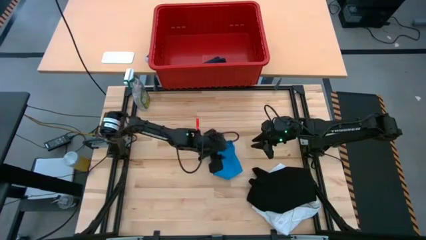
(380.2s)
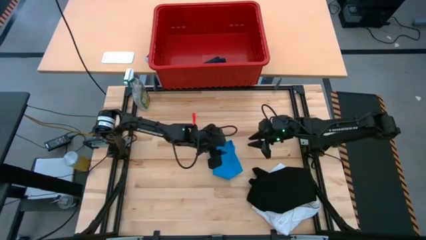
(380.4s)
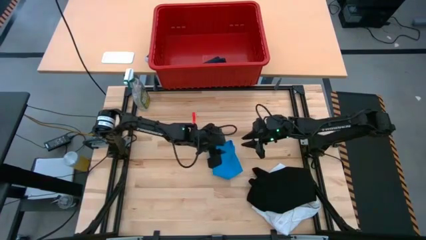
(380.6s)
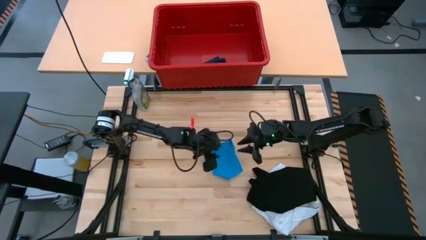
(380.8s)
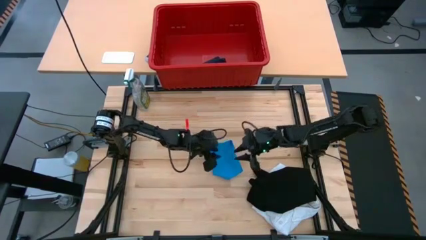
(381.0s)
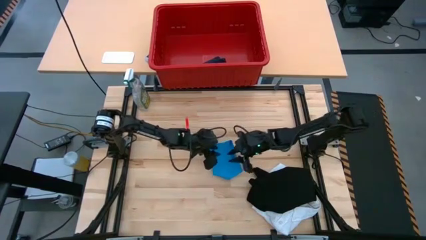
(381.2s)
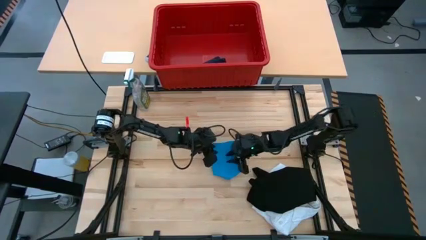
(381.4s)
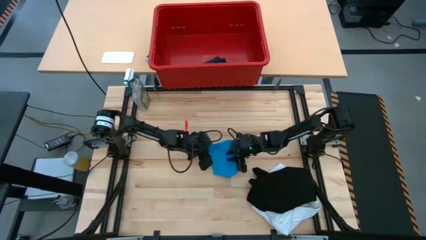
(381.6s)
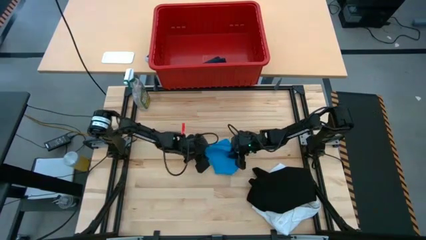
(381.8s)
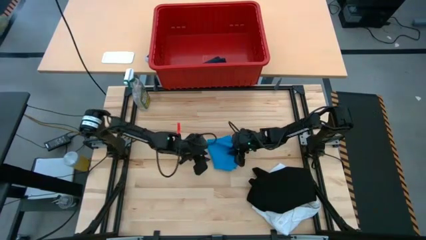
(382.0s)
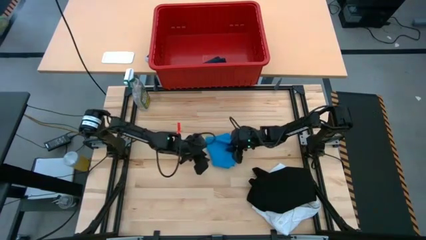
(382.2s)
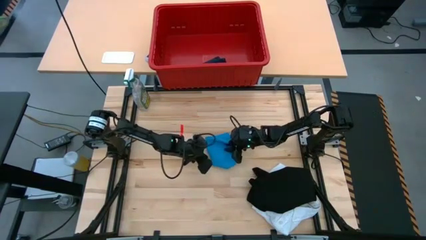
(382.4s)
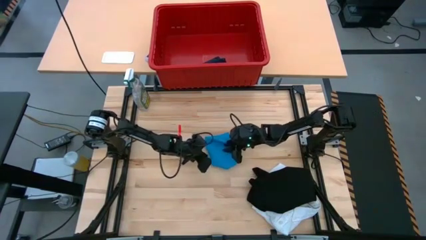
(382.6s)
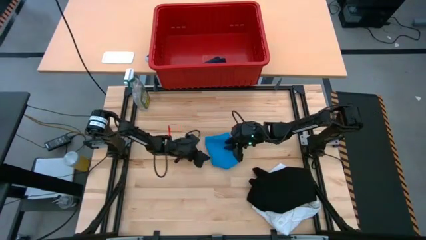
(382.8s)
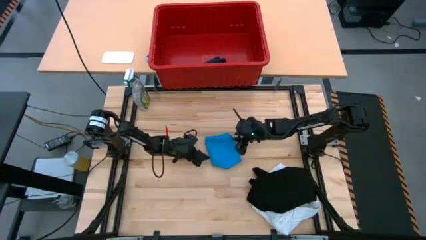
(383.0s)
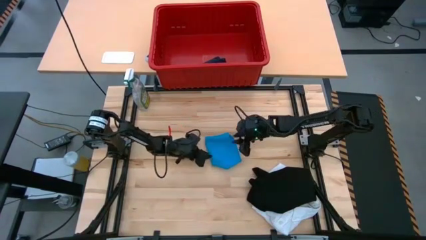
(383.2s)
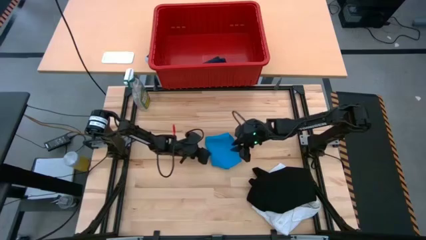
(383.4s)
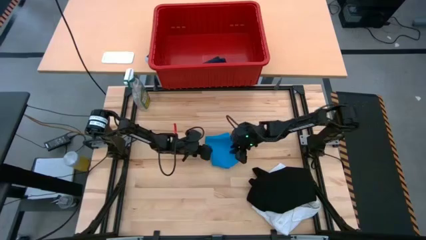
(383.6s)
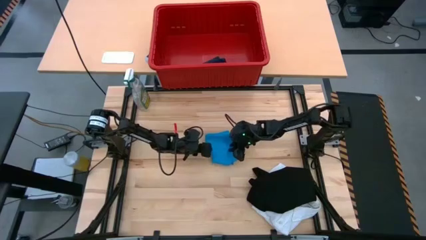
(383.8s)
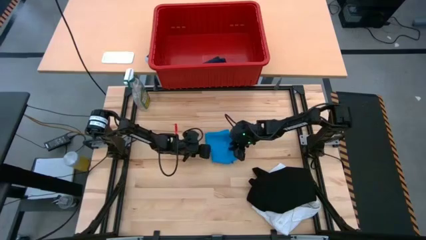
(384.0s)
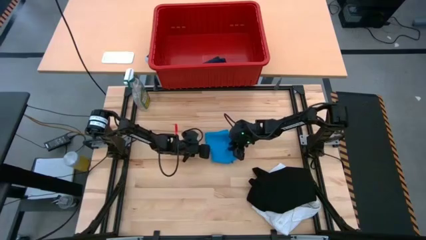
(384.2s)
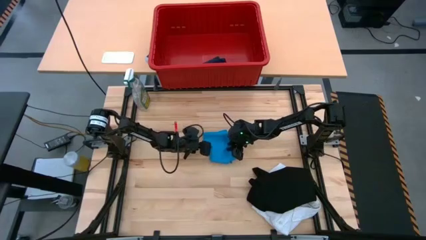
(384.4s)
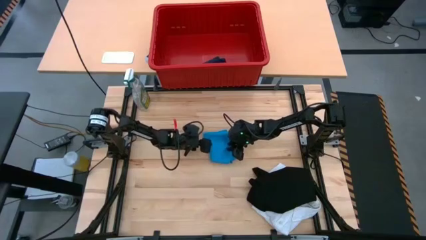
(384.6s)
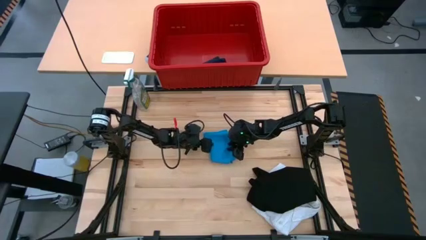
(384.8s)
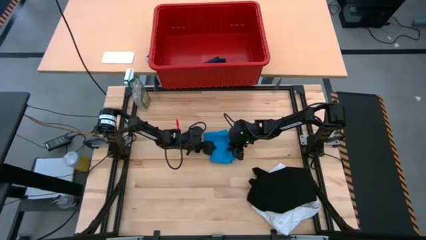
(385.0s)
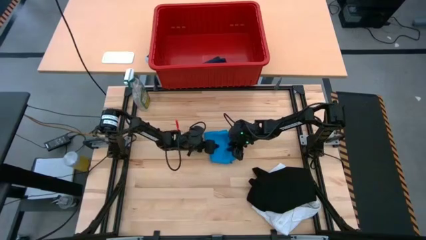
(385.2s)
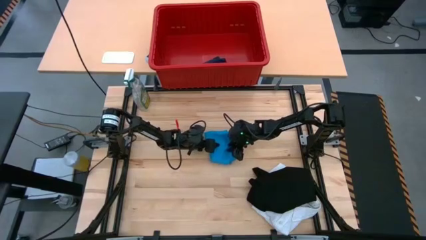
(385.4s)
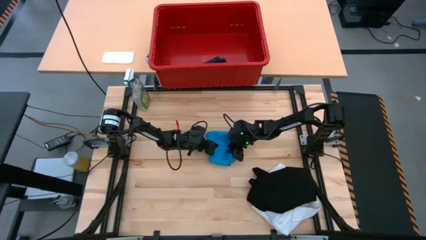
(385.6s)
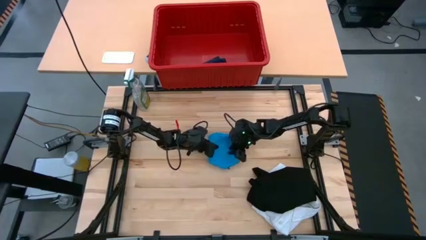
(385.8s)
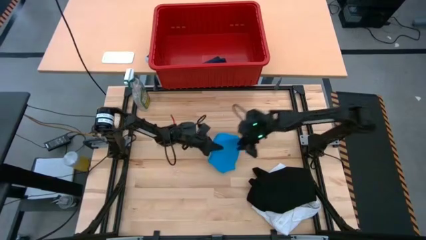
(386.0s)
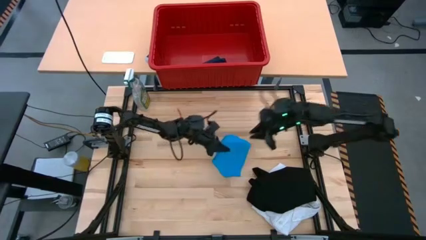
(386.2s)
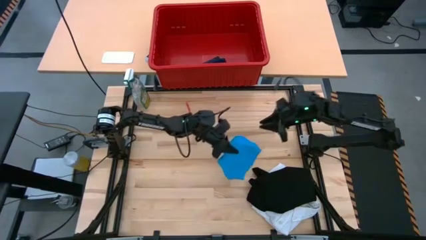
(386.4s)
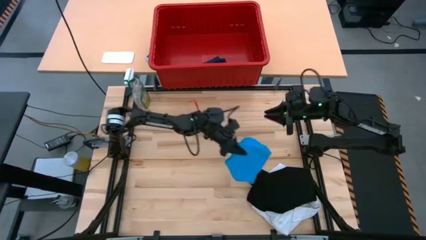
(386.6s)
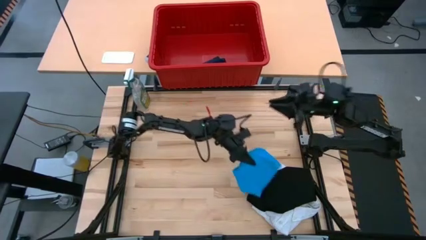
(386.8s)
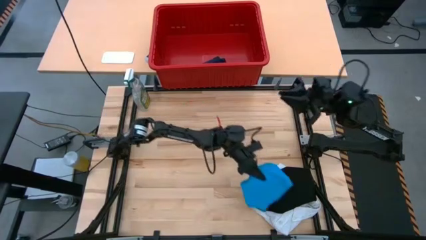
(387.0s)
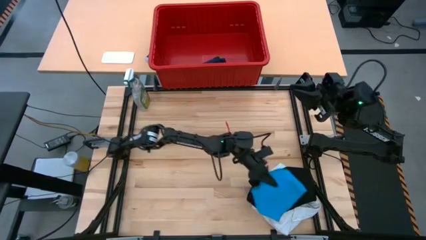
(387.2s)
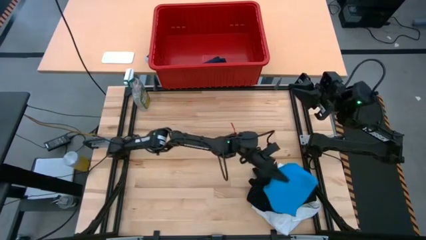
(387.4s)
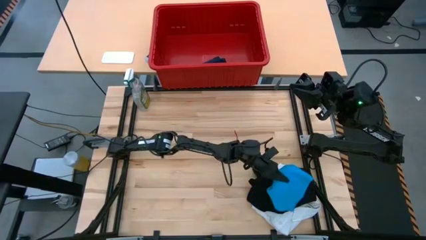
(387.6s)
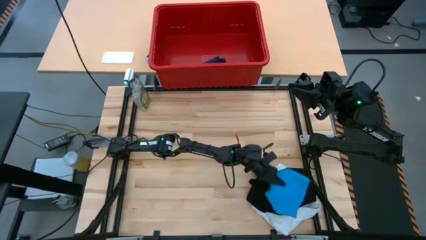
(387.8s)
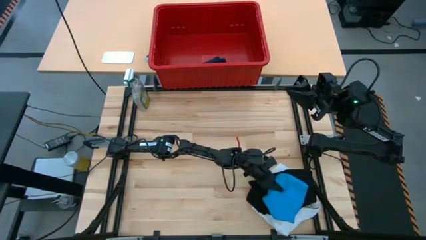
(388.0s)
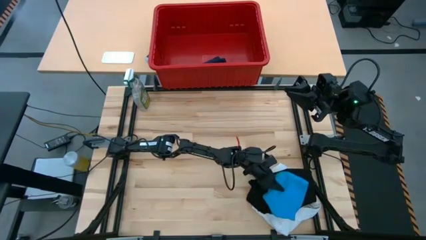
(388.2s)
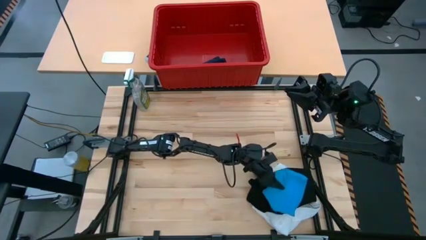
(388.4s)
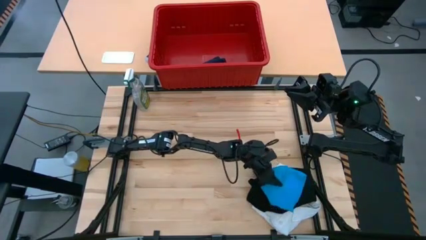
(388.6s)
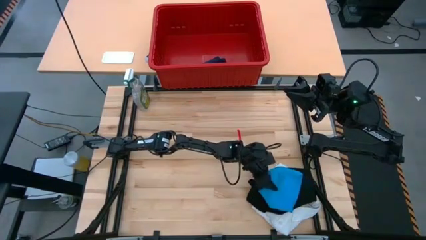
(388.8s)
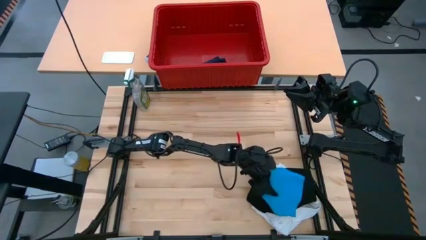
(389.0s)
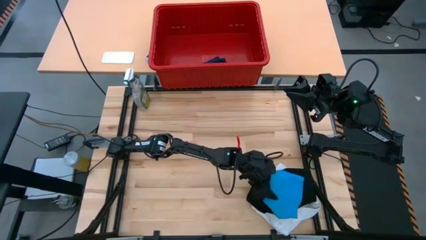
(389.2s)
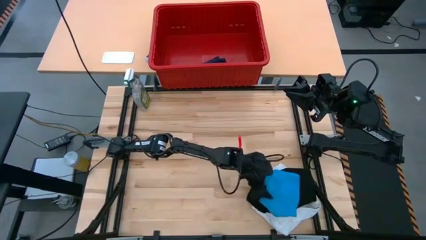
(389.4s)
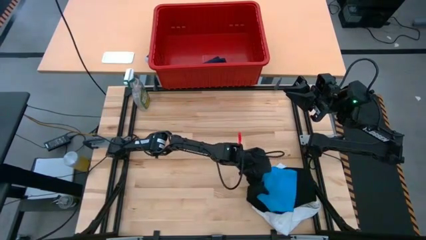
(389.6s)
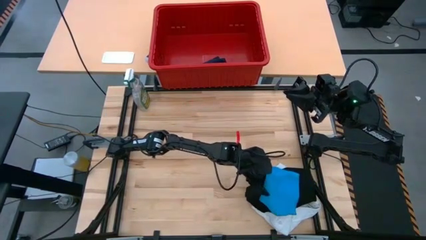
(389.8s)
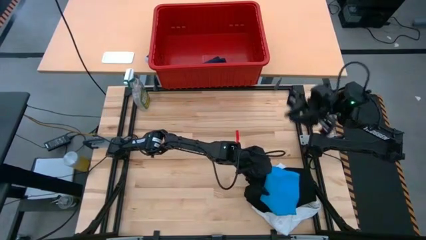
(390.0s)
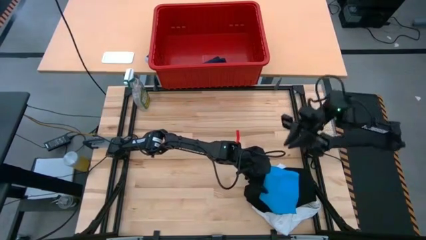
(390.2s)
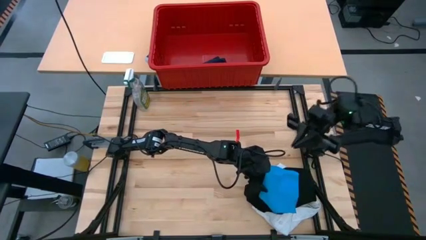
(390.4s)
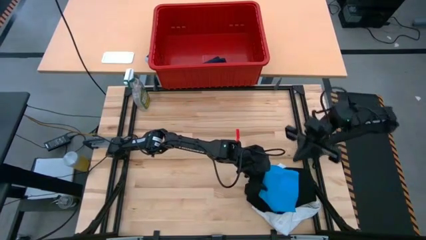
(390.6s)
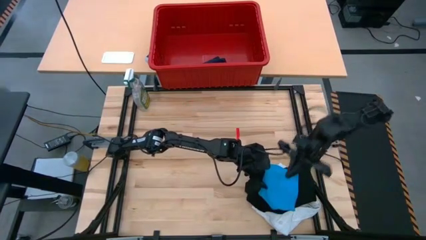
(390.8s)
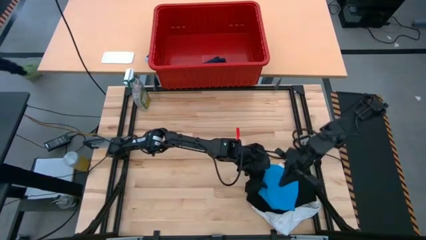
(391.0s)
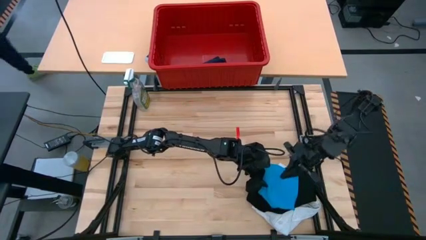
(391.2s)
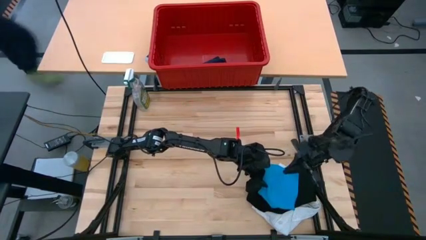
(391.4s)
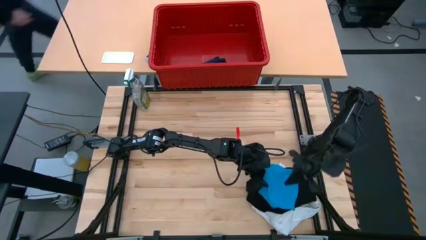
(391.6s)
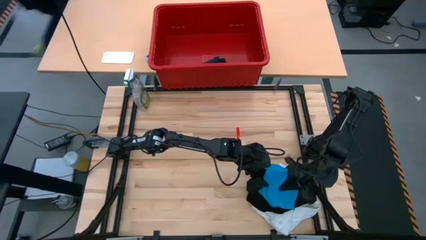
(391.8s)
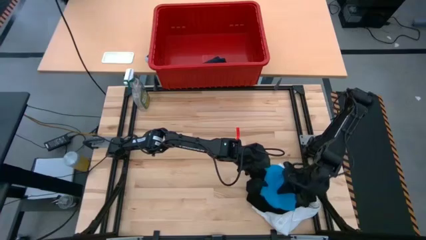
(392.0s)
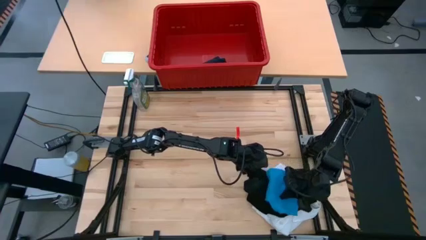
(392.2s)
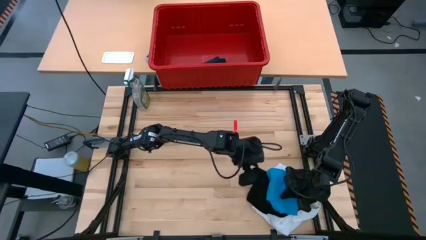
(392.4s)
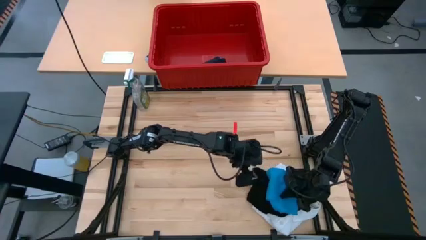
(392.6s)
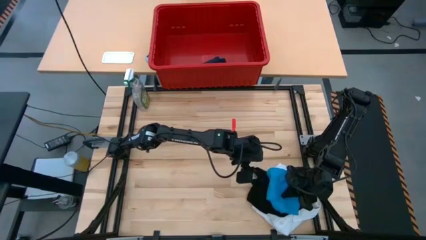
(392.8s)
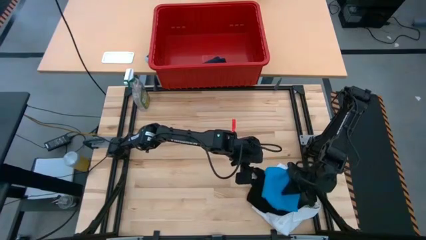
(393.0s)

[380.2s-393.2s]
Task: Fold laundry
Stack the folded blue shorts on top of the folded black shirt

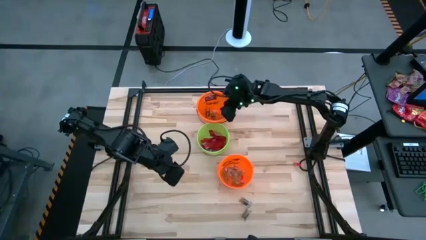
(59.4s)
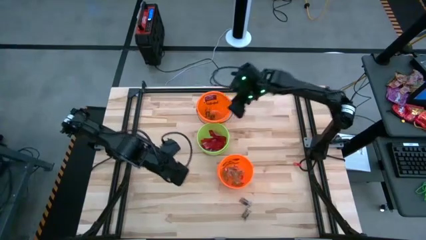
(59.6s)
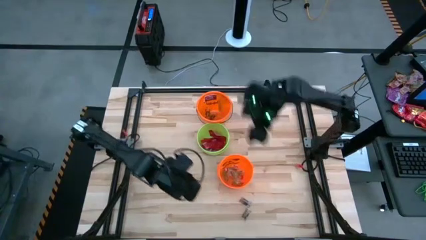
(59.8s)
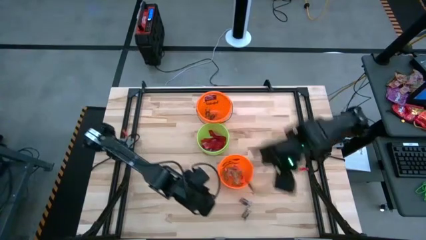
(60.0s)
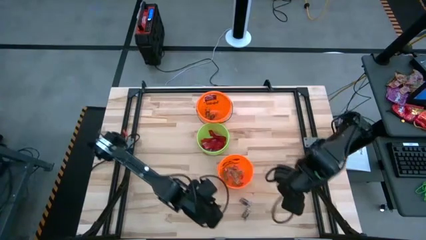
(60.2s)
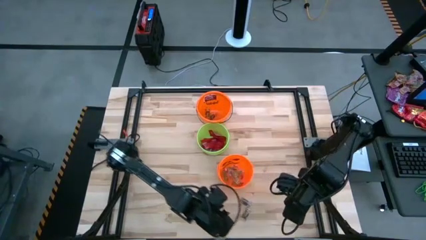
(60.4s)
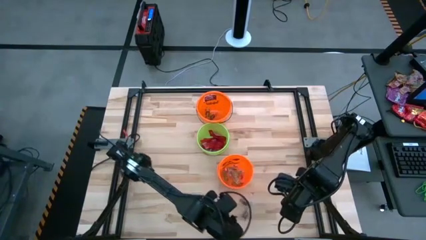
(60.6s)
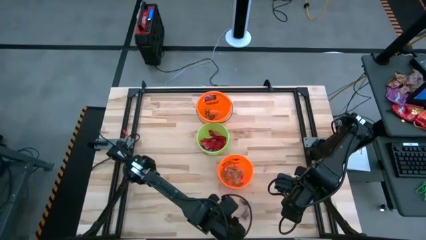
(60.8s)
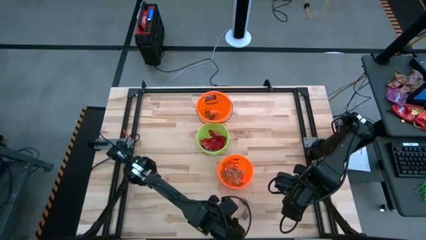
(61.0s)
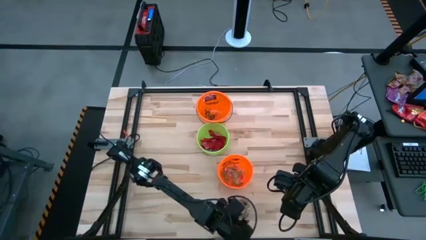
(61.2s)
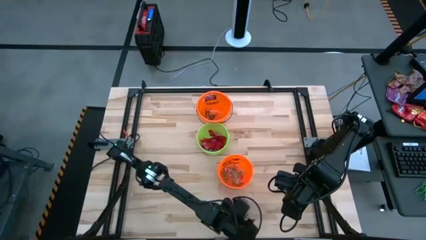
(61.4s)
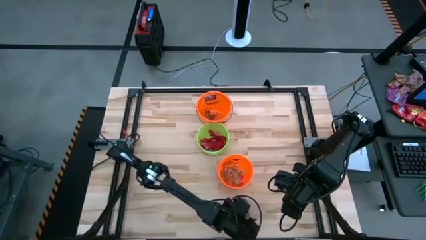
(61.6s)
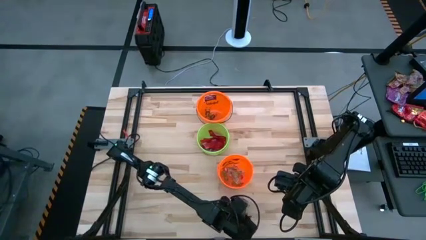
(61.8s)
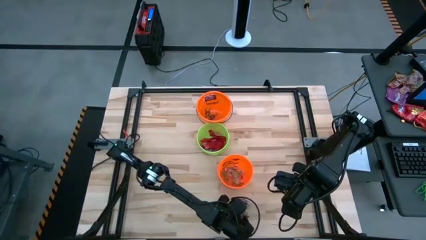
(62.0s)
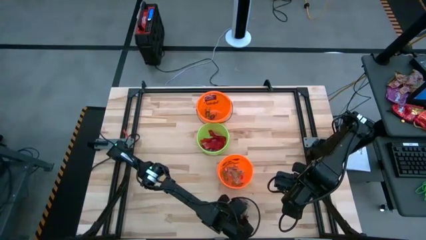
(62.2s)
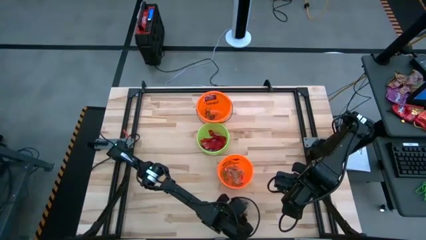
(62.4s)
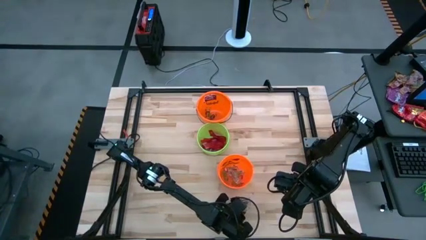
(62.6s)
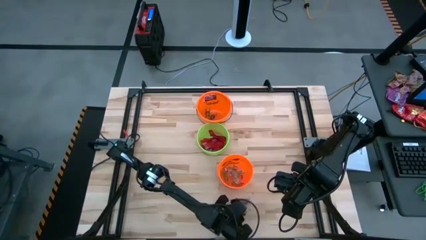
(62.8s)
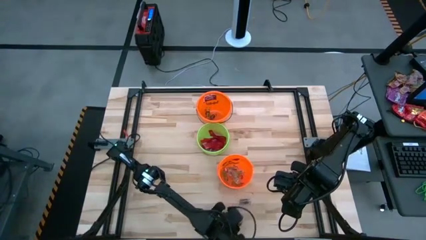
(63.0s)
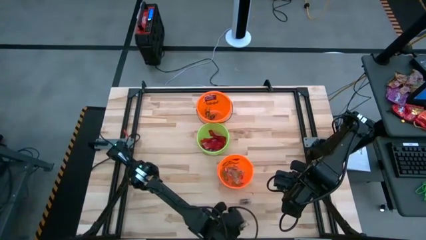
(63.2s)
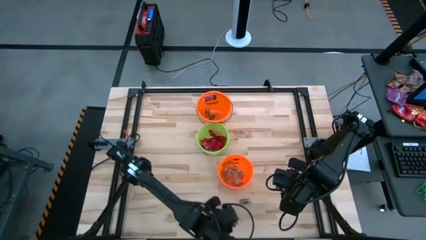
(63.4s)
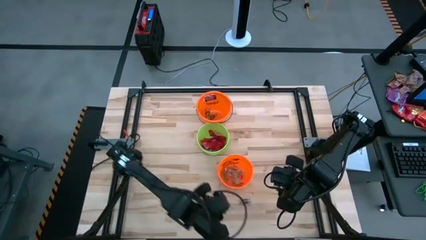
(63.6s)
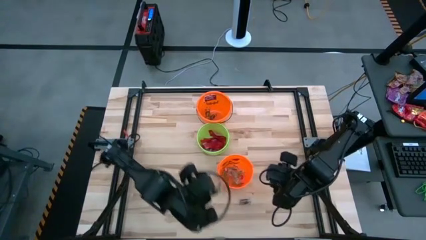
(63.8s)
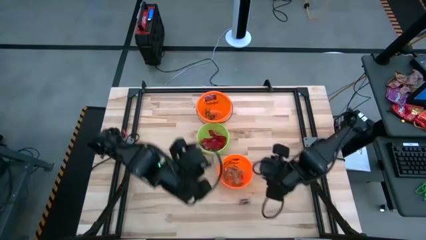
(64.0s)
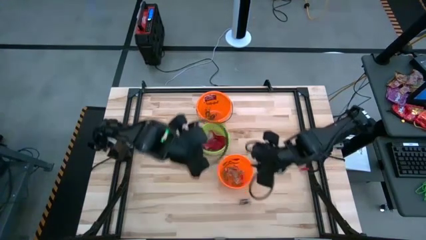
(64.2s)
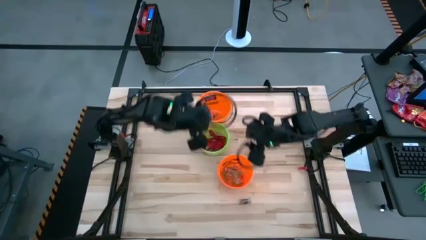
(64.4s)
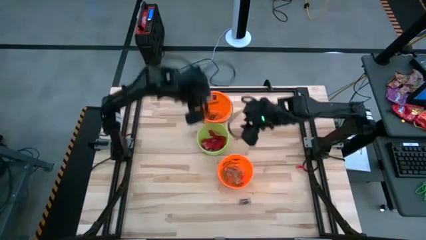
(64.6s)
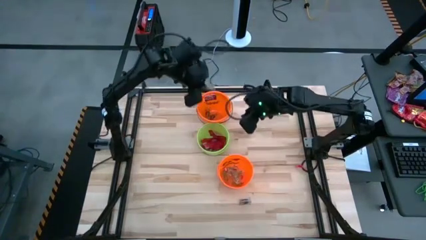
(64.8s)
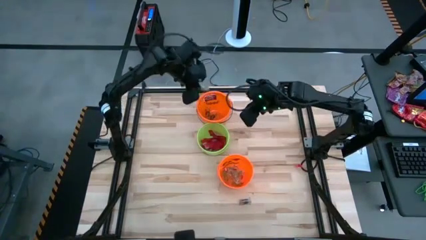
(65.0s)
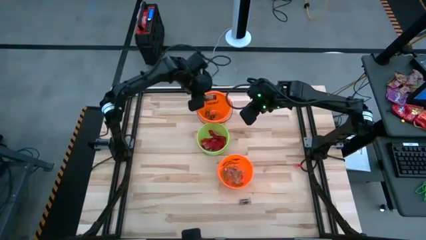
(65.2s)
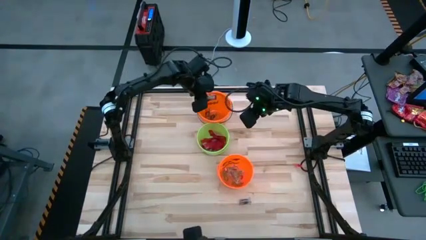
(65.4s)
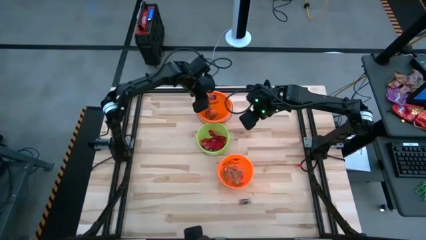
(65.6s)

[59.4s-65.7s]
Task: Sort candy by brand, put in halloween buckets
Put the black gummy into the top orange bucket
